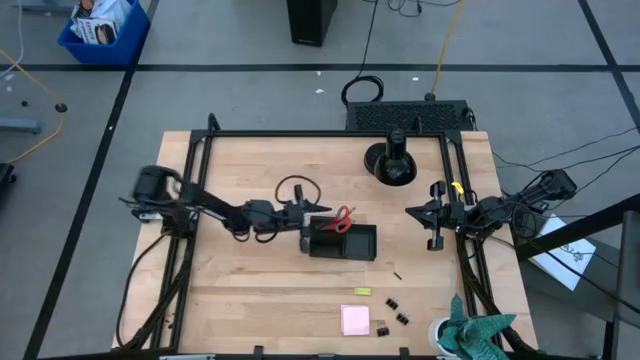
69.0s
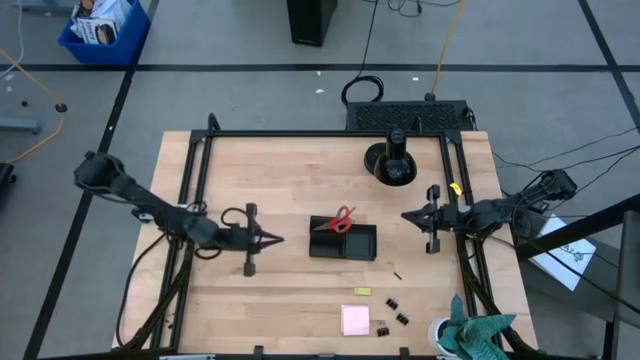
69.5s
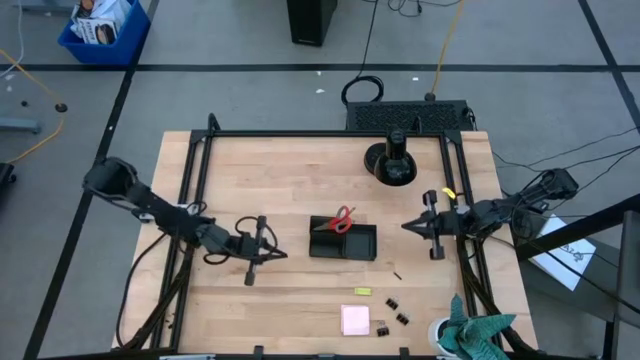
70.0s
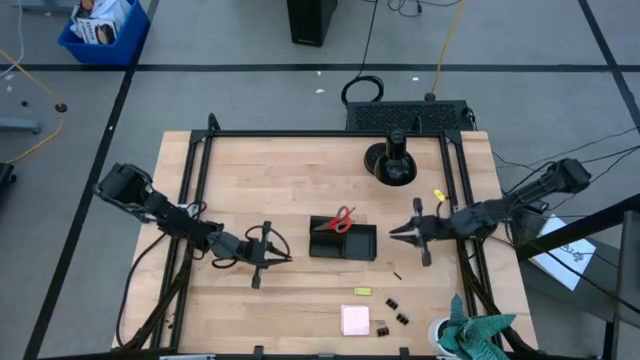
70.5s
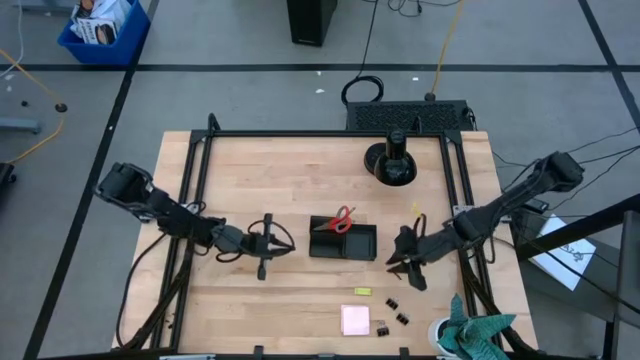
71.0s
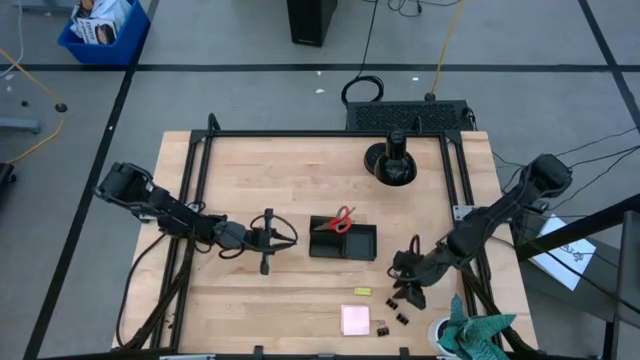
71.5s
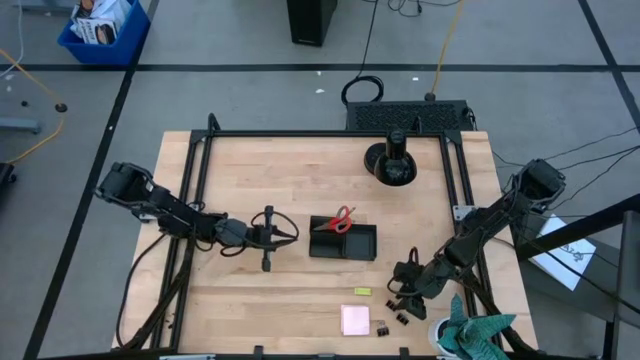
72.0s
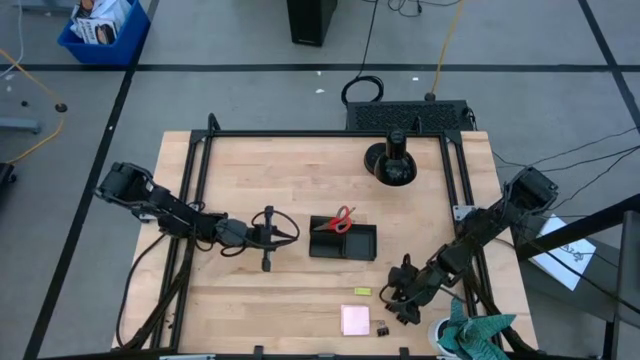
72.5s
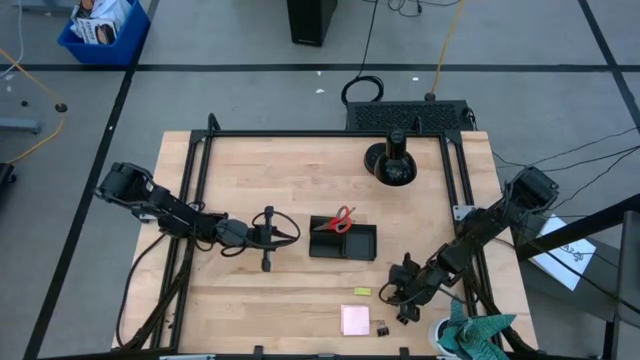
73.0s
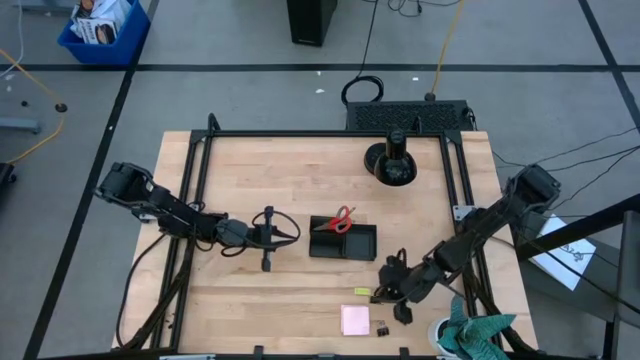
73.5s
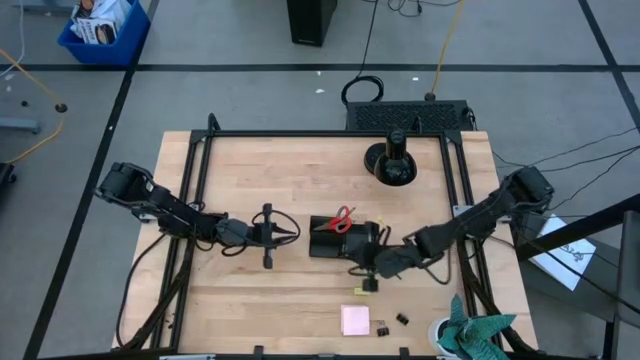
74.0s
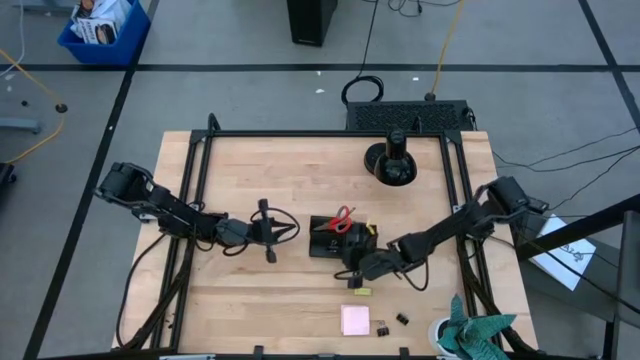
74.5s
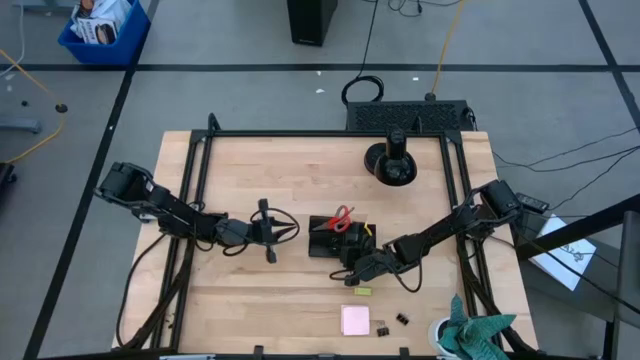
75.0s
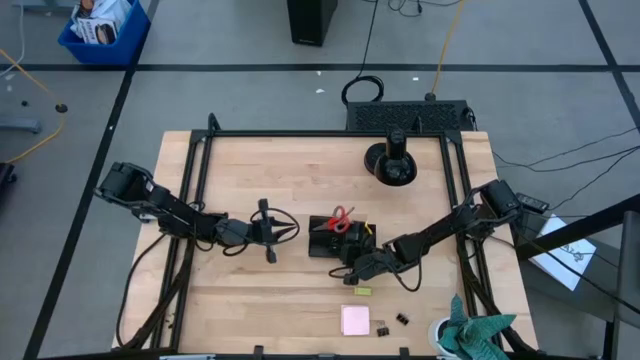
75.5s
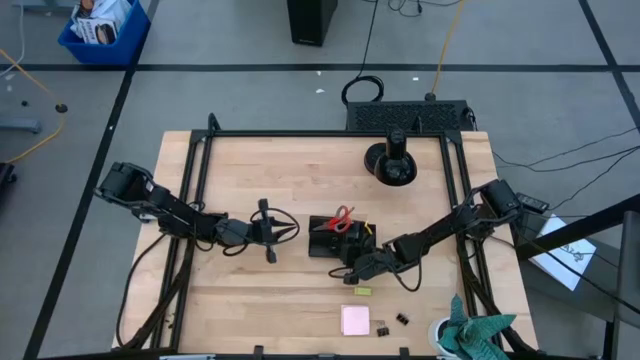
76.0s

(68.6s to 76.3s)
Task: Pick and place office supplies into organizer
Put the black binder clip into the black desk organizer

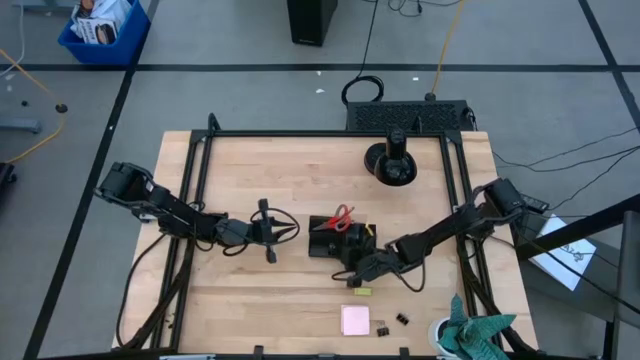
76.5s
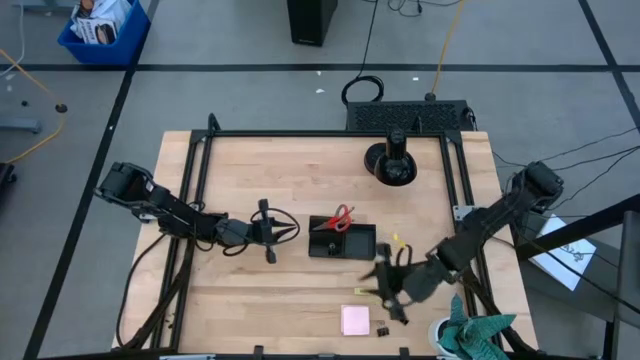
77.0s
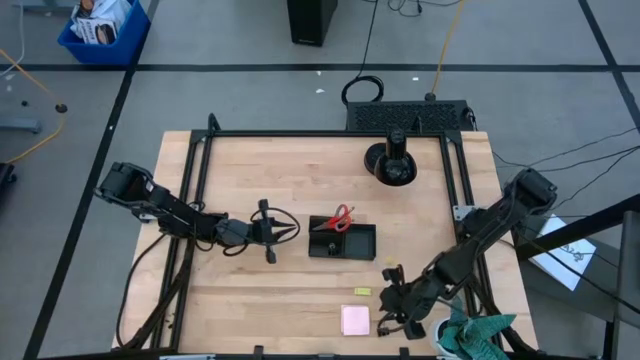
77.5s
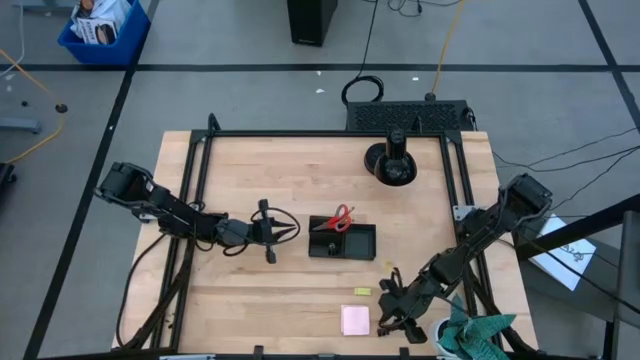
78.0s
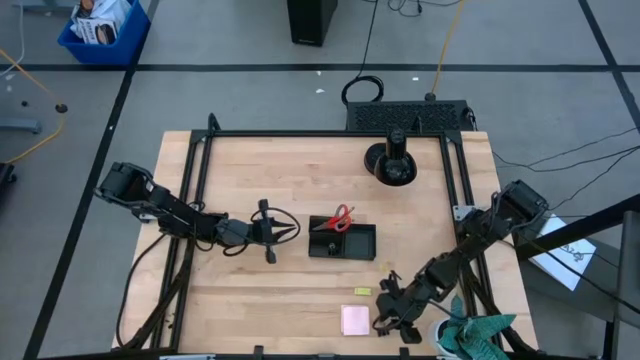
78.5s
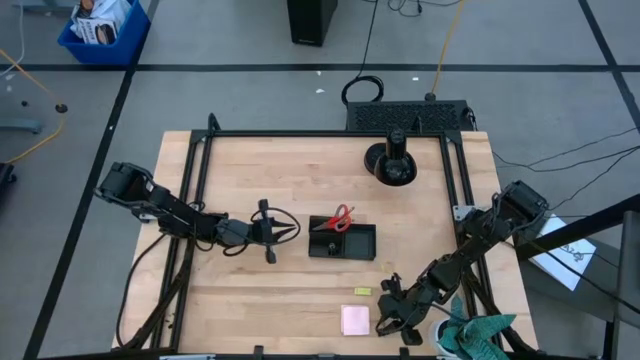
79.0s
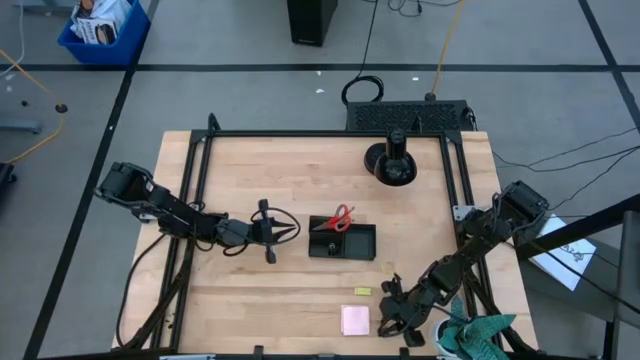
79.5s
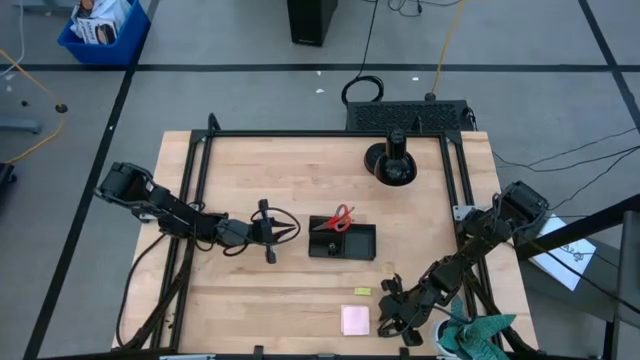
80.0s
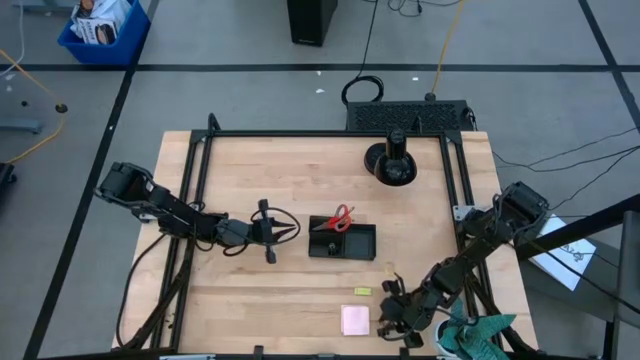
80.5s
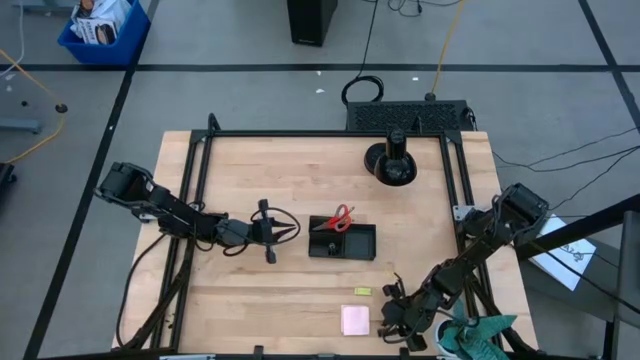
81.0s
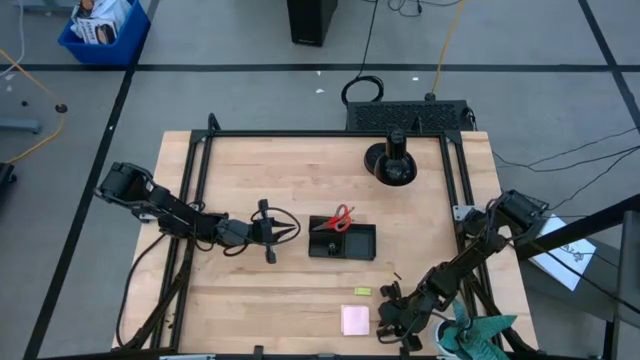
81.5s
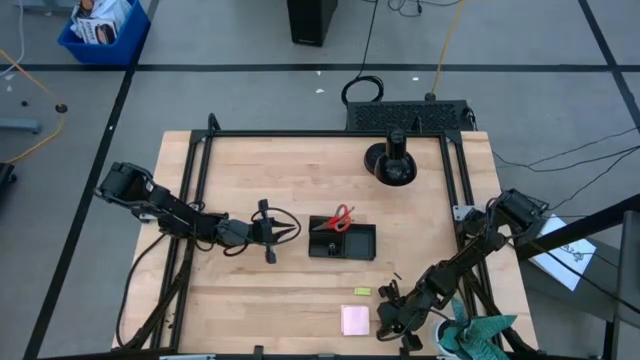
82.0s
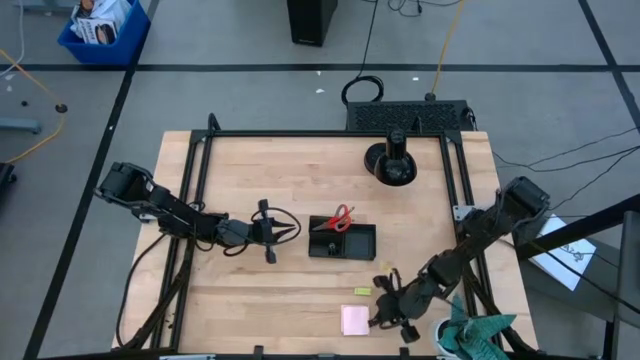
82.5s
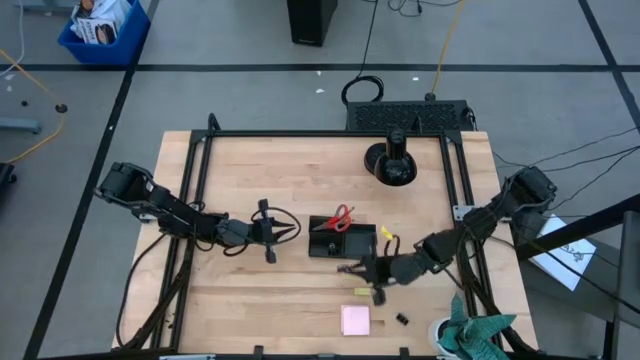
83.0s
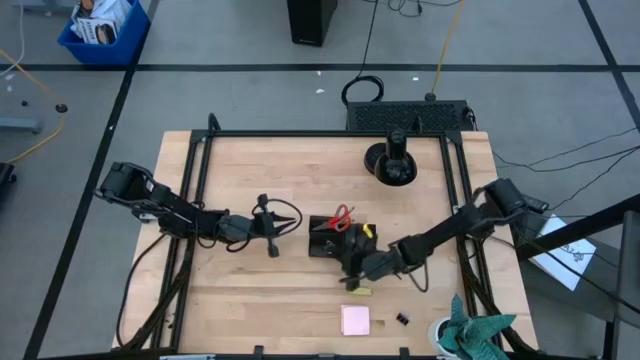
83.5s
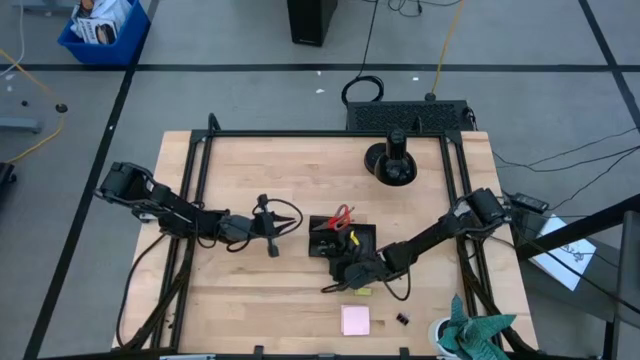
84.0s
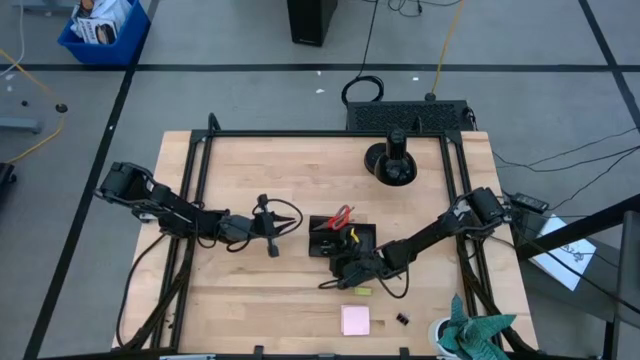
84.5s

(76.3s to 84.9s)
Put the black binder clip into the black desk organizer

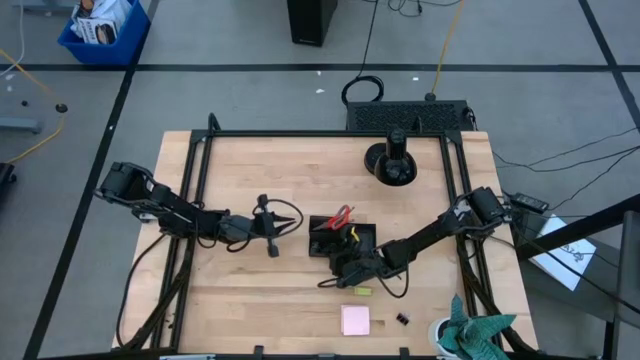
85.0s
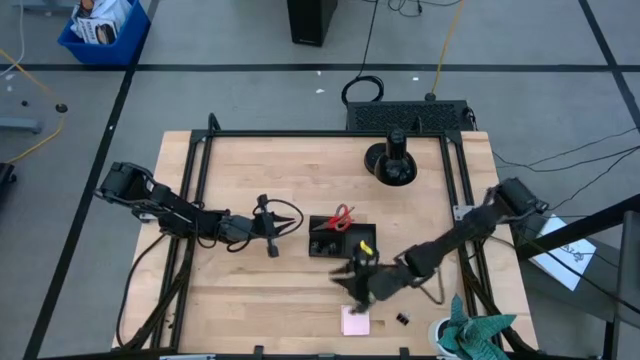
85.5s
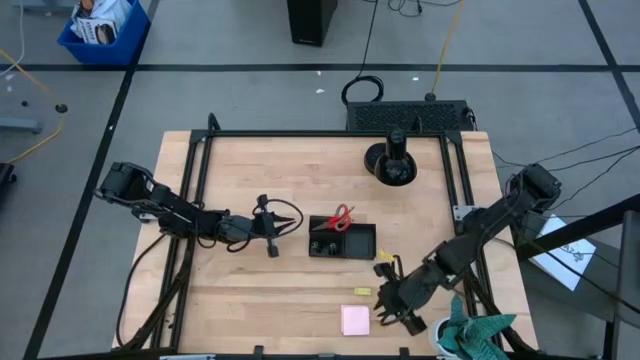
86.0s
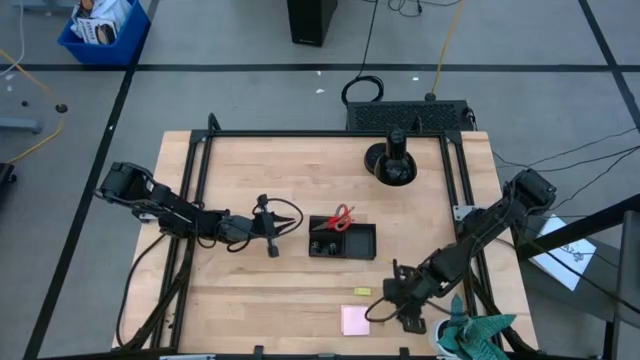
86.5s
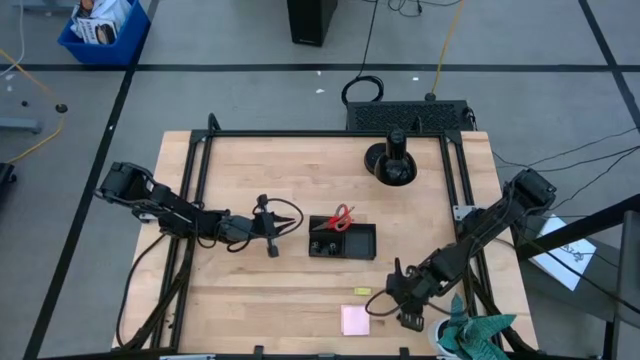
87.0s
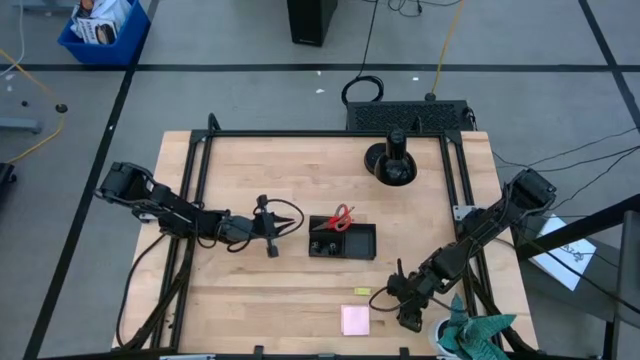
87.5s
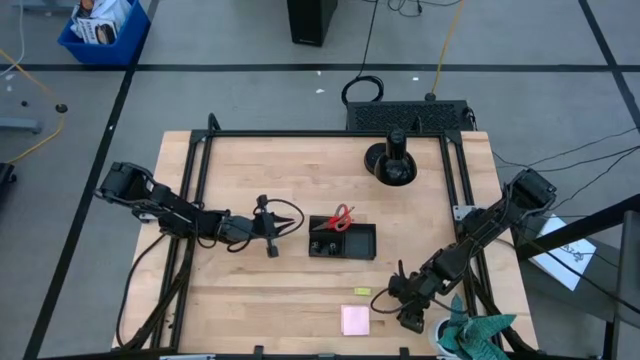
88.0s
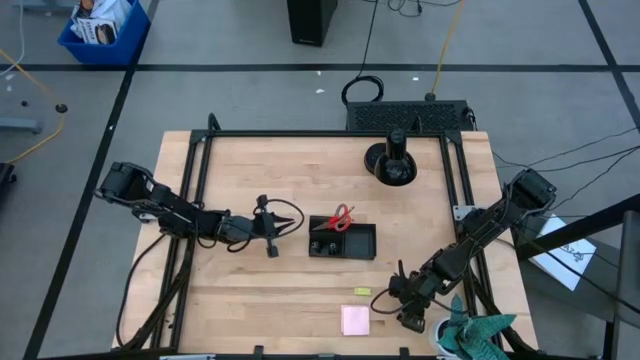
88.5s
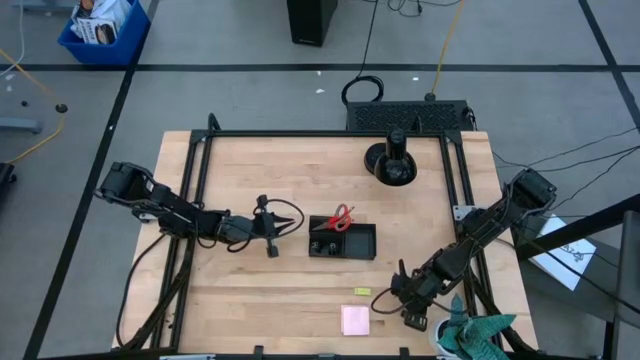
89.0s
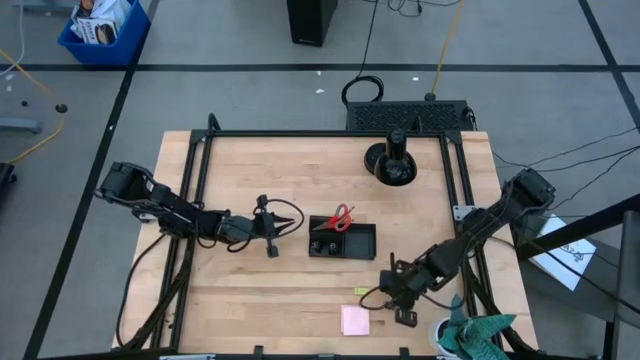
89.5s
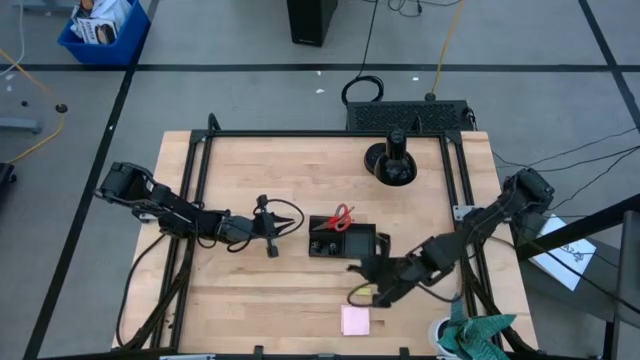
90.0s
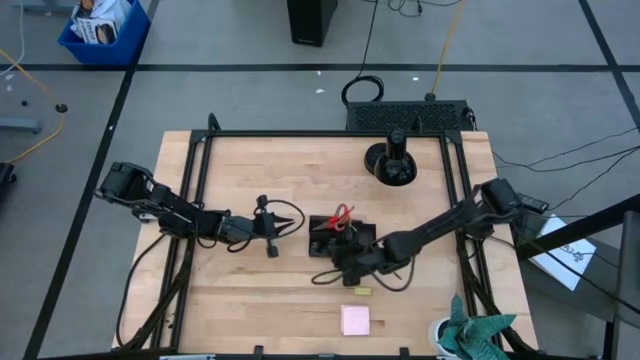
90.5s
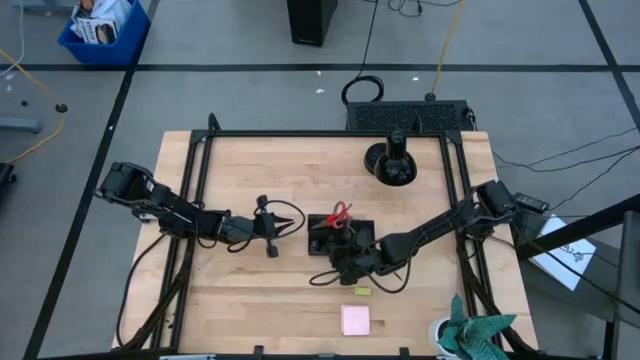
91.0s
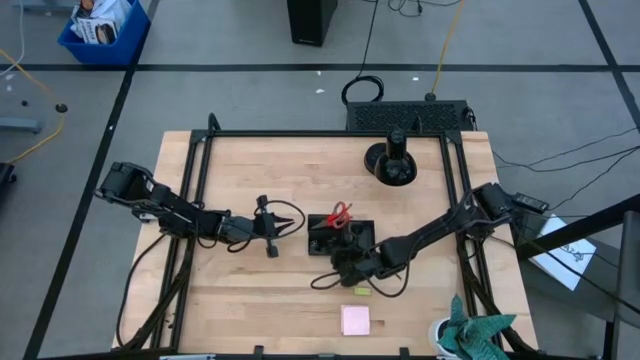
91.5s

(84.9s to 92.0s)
Put the black binder clip into the black desk organizer
